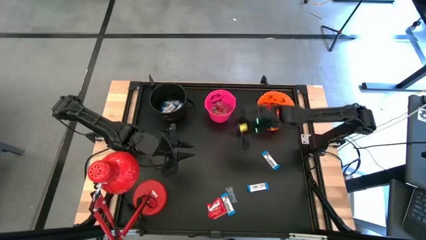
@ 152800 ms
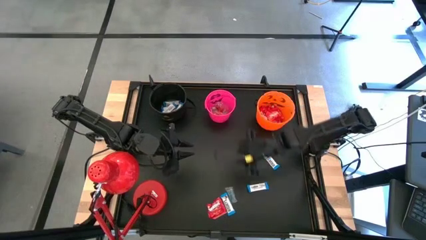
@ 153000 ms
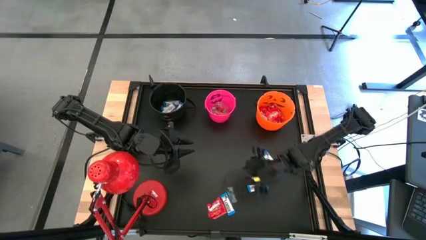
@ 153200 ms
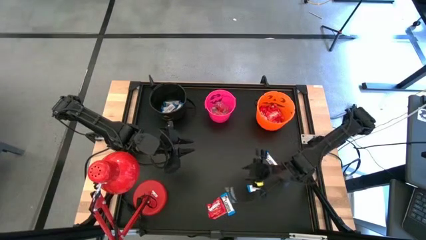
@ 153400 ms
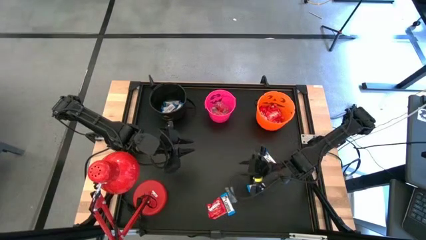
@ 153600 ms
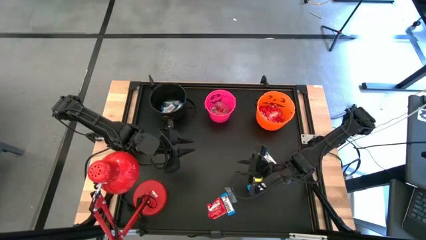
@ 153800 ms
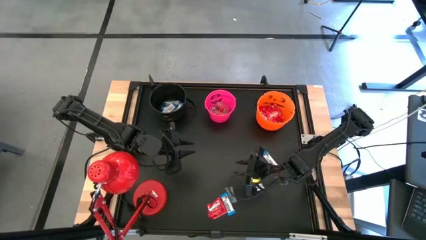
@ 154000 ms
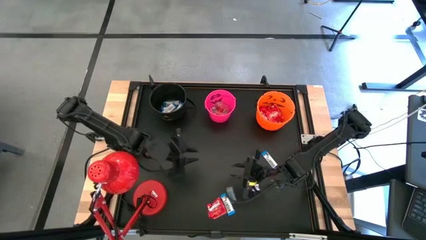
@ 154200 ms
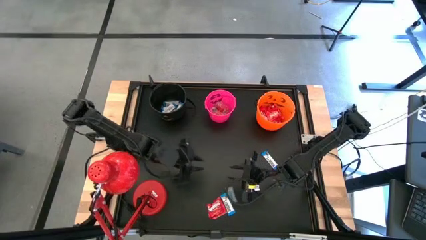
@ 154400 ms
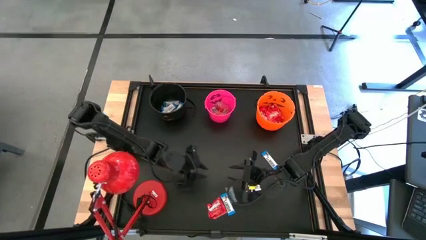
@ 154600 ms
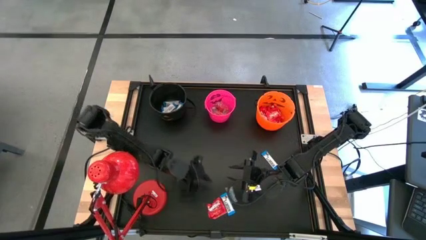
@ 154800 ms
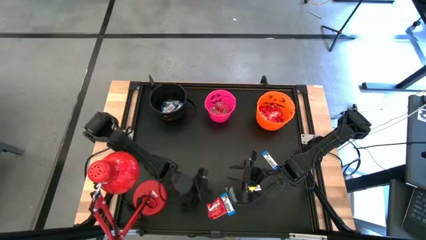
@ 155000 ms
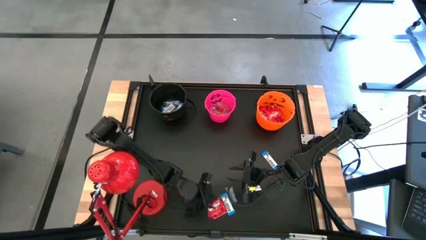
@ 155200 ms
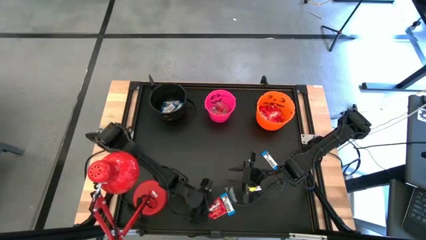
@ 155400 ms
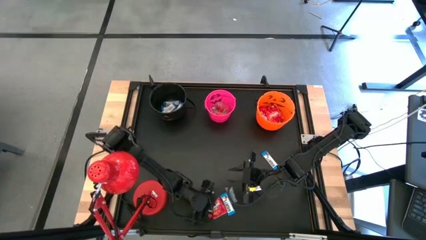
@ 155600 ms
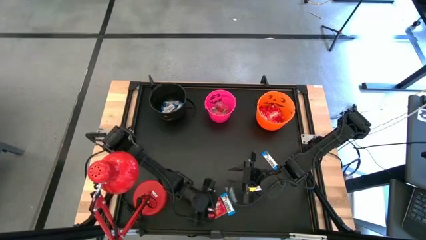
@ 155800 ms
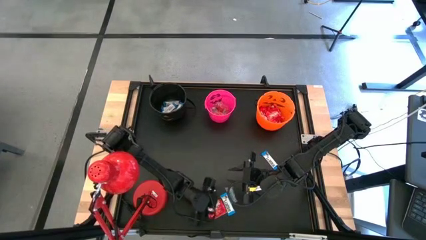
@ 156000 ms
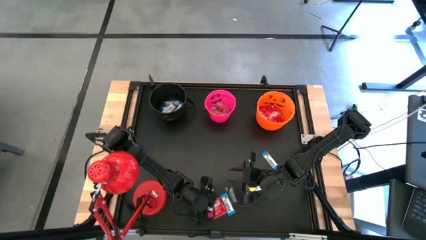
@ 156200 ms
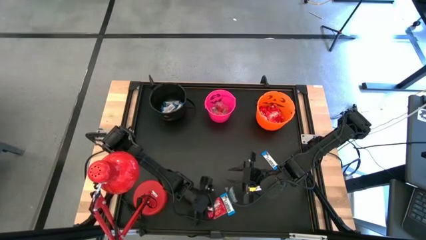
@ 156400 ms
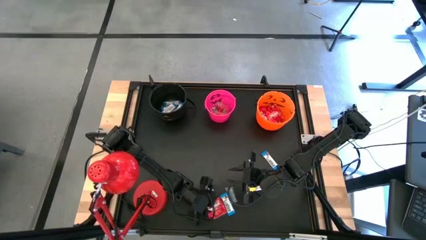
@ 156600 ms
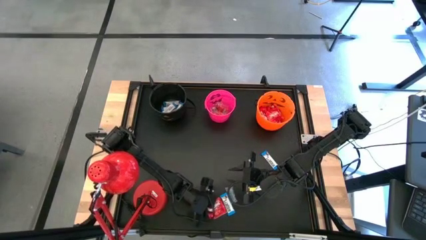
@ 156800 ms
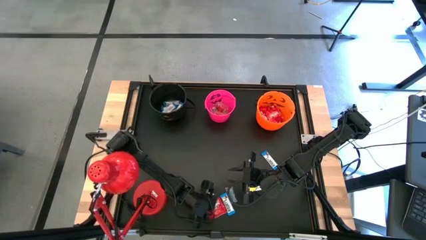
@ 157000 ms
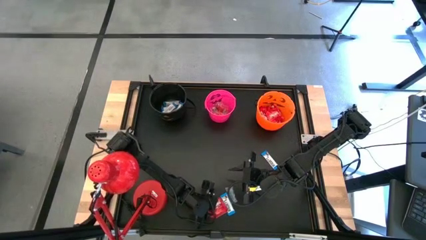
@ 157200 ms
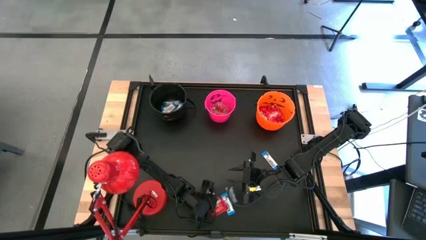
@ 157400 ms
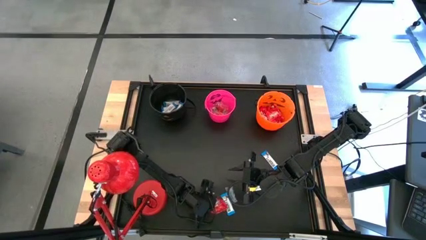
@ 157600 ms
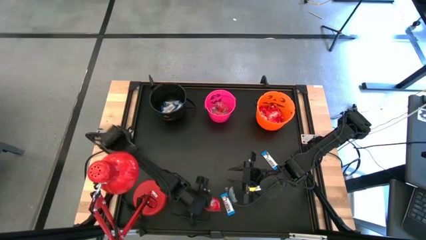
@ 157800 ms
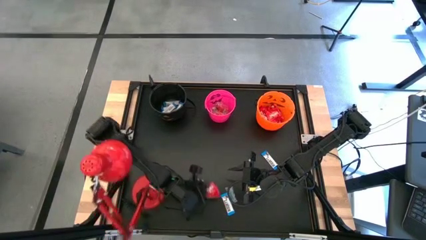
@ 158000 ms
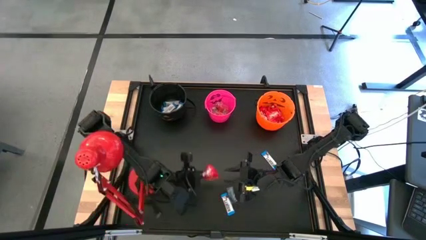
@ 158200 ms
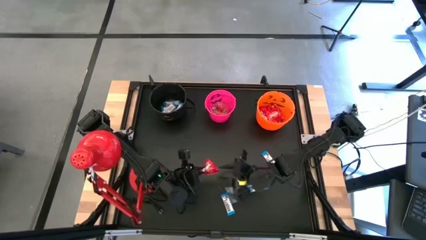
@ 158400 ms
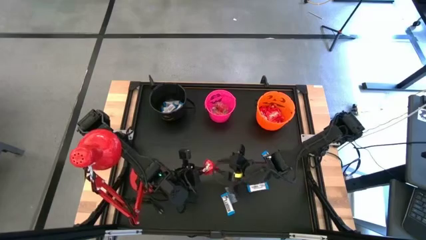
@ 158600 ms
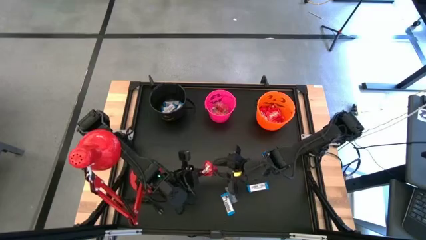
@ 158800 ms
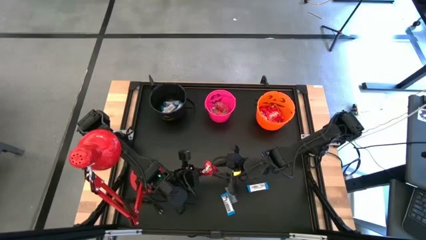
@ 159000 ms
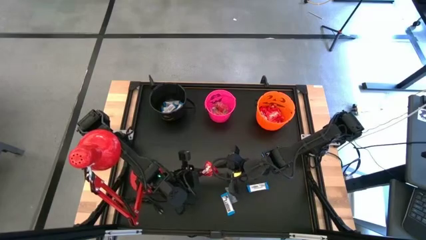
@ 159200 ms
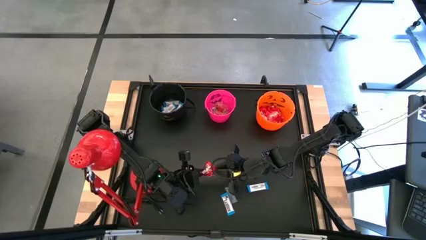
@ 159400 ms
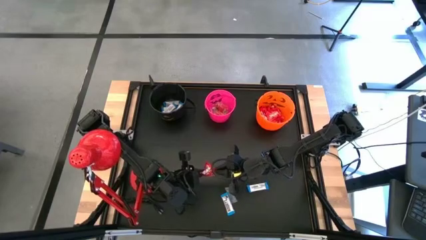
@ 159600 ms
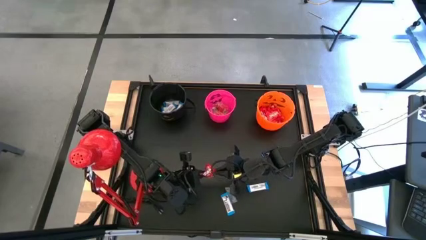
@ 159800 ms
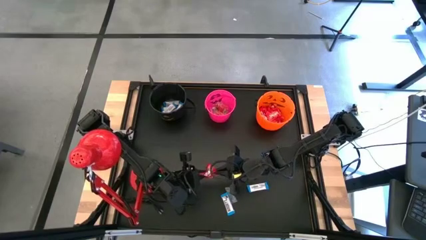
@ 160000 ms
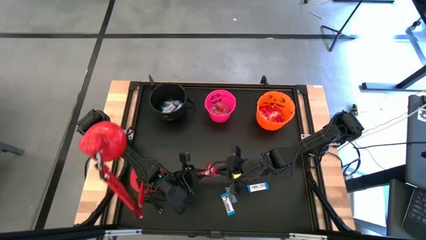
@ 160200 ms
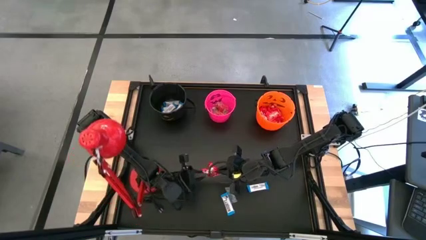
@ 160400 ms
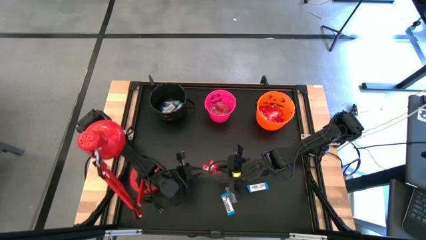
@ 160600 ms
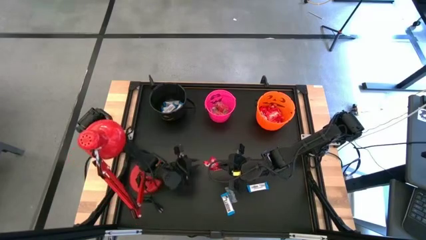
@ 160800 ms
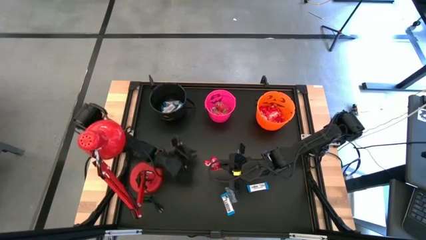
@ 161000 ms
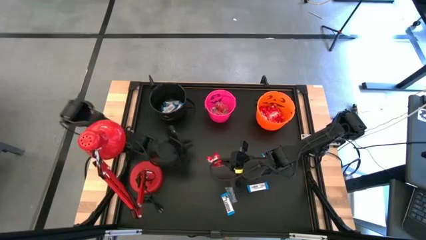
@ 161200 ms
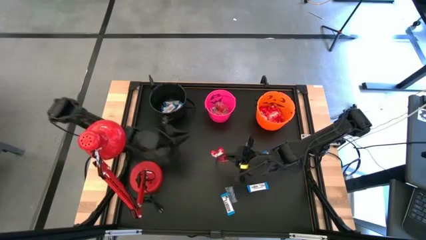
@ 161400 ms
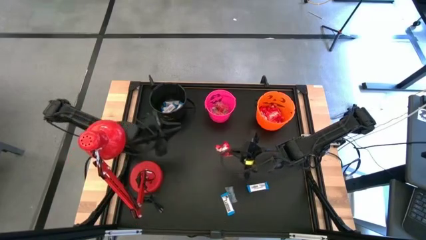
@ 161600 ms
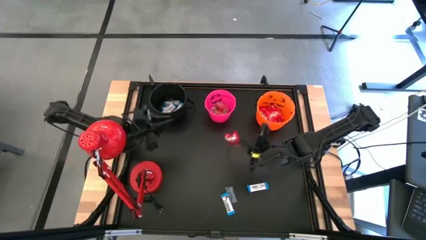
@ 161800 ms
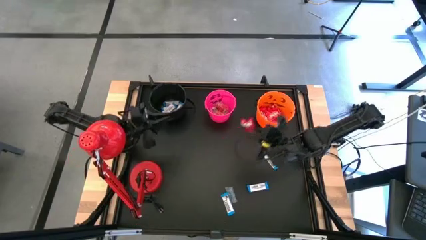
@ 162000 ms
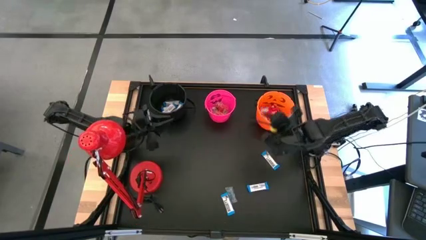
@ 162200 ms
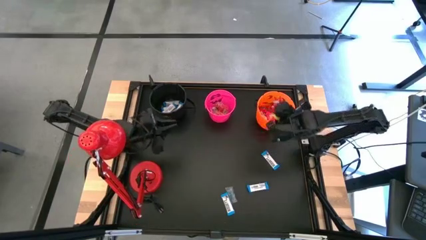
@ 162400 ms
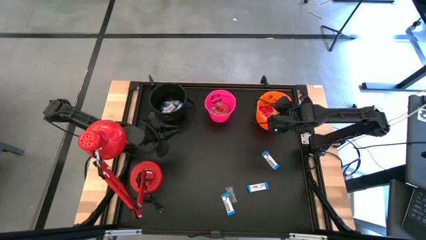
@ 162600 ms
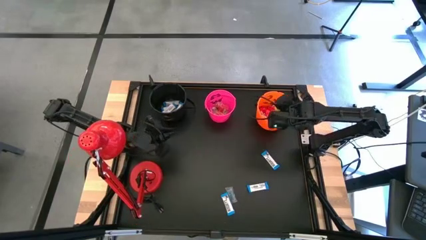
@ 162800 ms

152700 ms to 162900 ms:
Task: Organize candy in baskets
Put the red candy into the orange bucket

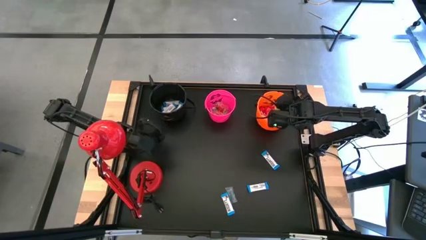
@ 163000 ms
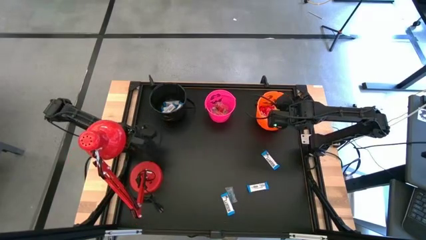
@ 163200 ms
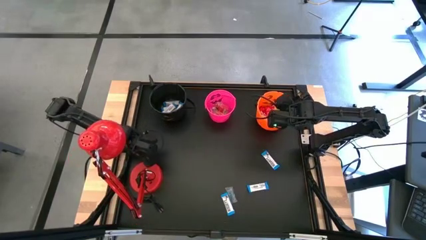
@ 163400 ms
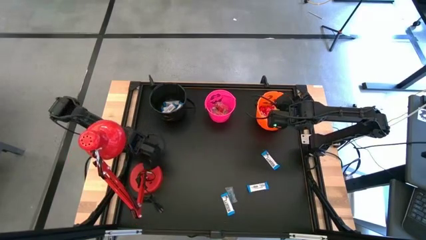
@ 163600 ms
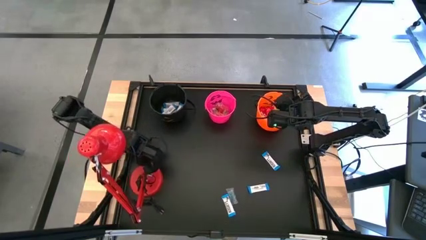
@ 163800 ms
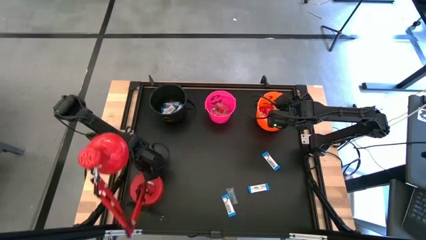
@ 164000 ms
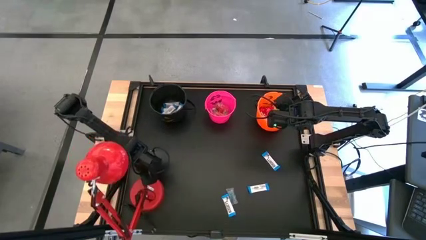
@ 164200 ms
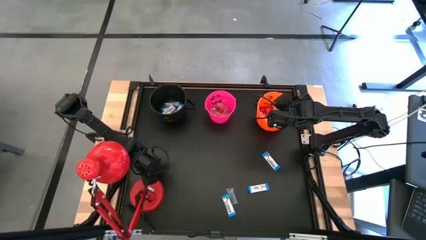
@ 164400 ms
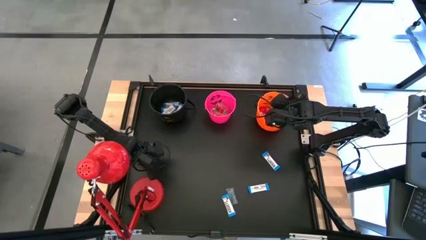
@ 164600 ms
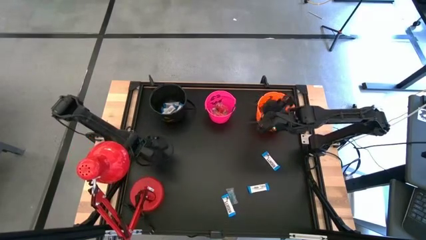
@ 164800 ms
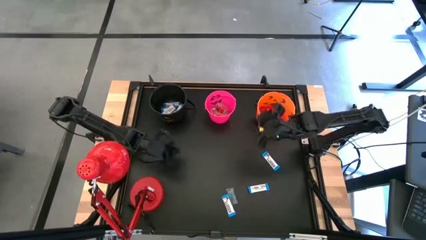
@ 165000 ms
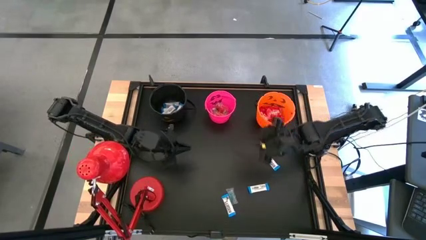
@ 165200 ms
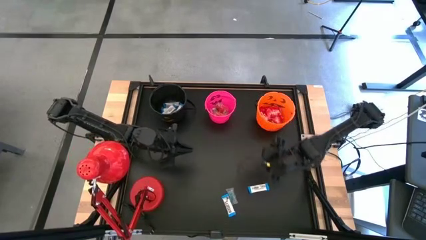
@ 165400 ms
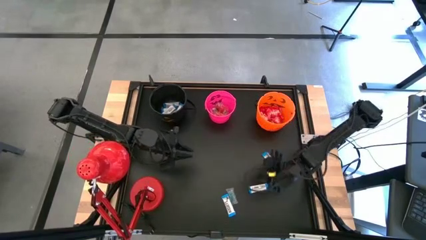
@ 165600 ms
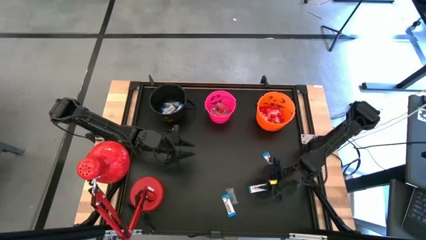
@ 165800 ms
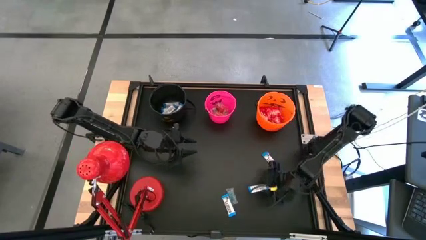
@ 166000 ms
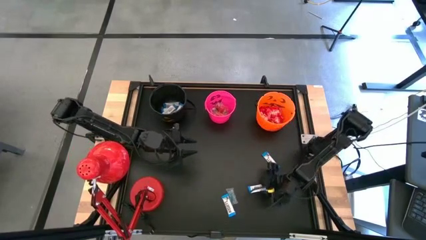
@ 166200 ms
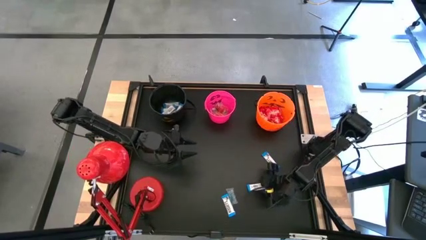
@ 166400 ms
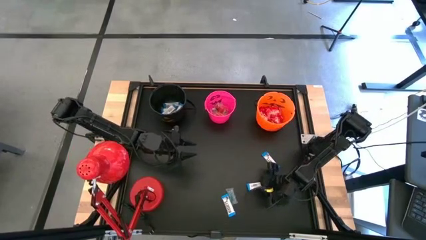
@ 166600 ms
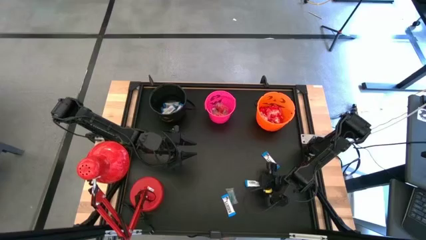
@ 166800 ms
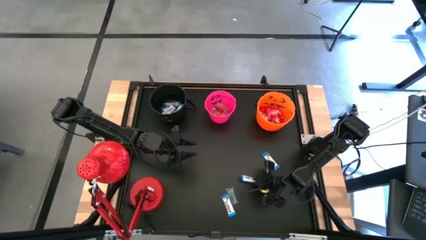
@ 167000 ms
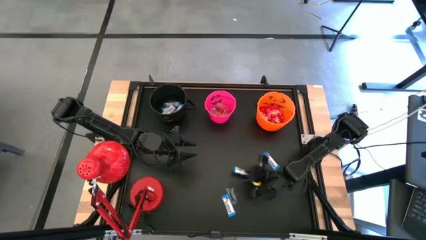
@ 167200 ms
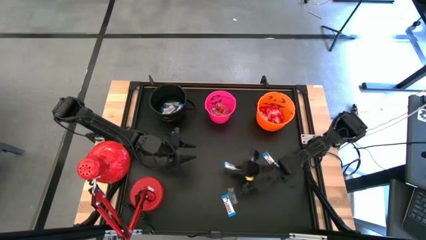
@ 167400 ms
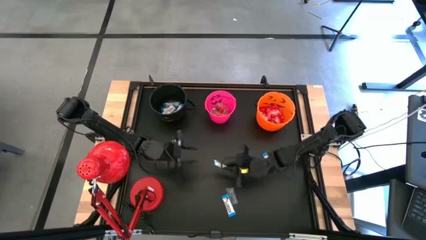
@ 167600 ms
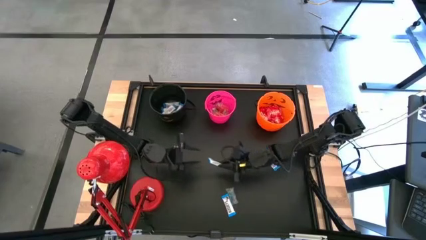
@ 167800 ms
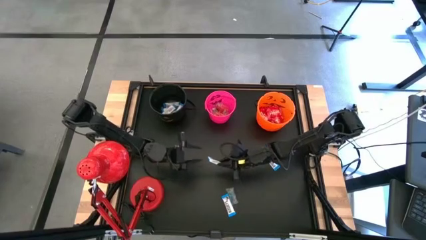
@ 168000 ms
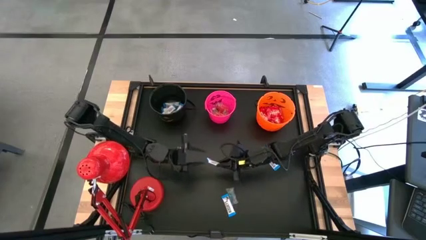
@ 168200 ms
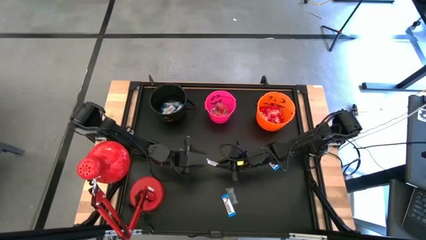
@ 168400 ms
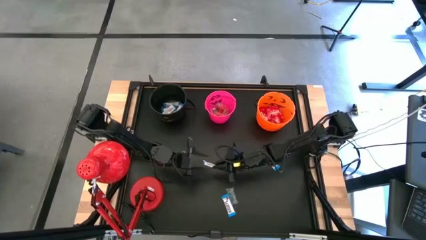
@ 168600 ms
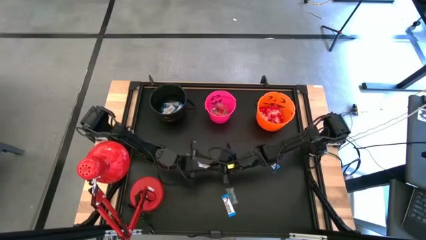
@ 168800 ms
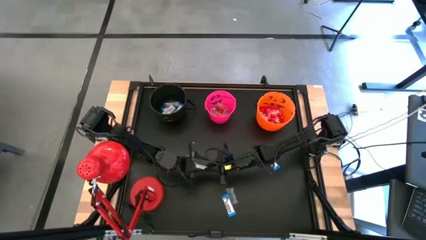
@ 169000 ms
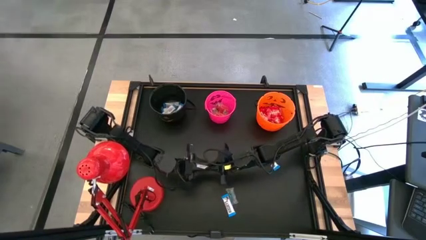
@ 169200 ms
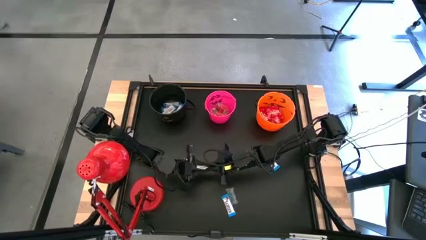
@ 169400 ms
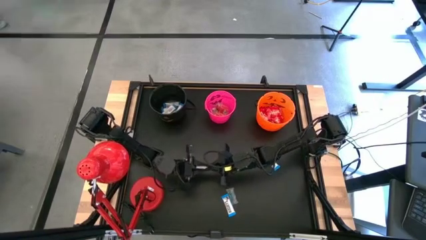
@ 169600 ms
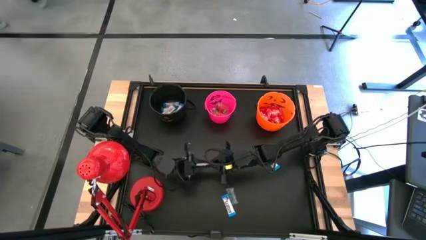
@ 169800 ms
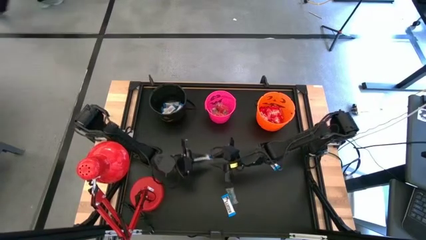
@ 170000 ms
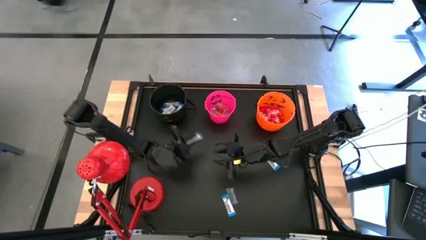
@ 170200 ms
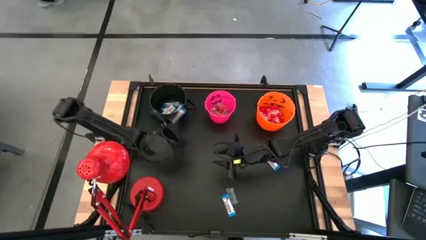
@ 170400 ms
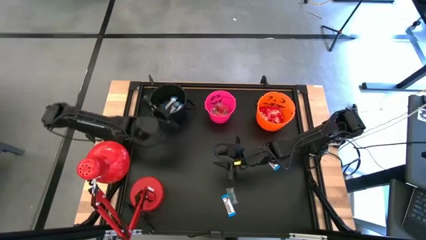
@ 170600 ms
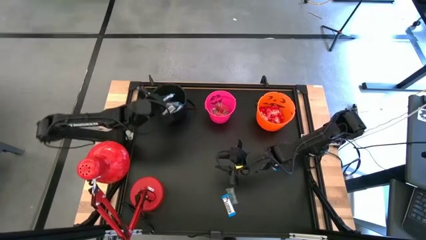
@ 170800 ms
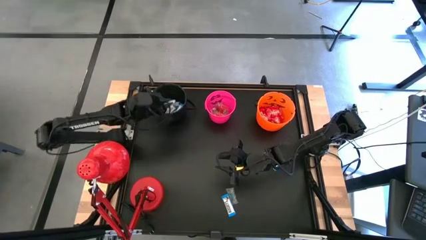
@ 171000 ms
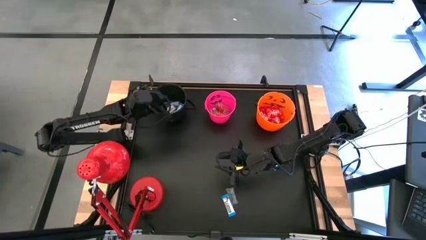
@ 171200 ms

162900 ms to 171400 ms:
Put the white chocolate bar into the black bucket
